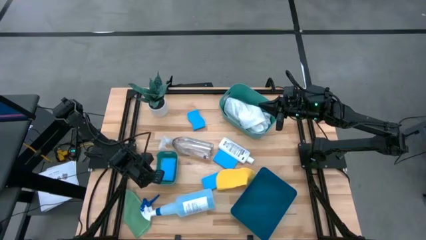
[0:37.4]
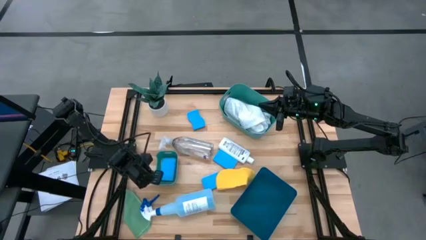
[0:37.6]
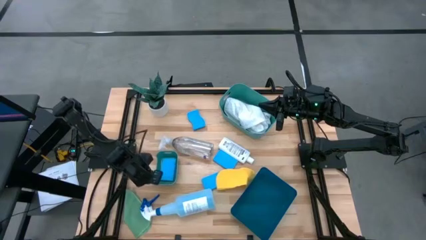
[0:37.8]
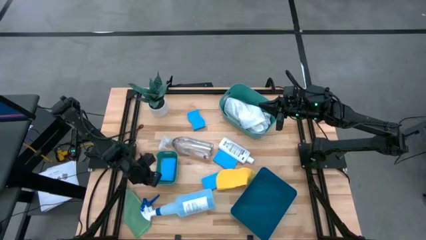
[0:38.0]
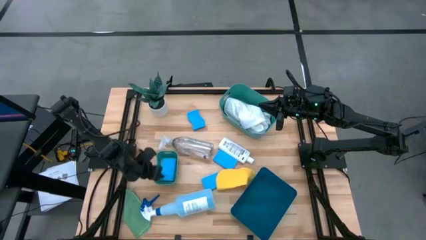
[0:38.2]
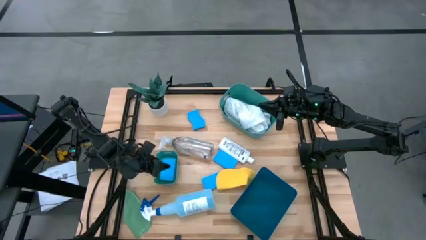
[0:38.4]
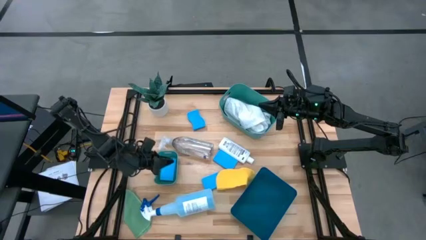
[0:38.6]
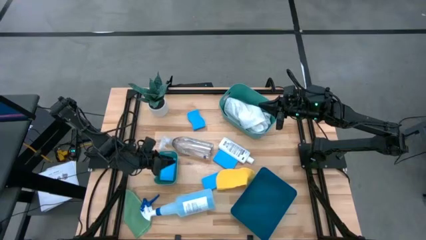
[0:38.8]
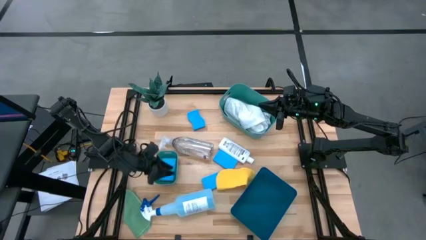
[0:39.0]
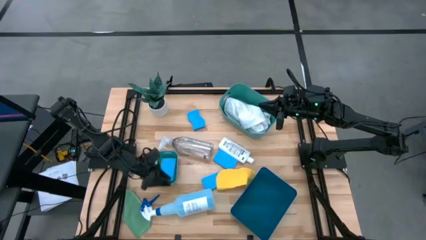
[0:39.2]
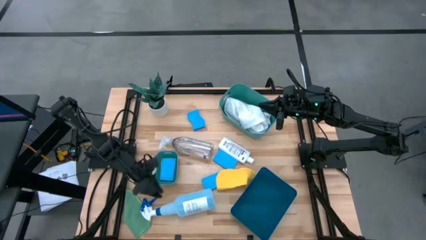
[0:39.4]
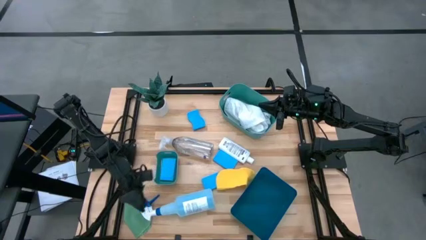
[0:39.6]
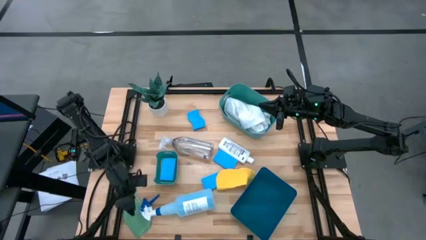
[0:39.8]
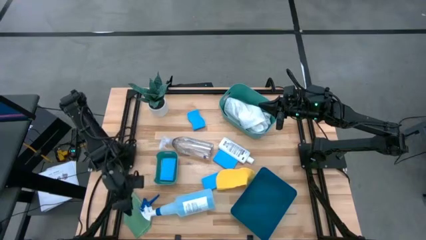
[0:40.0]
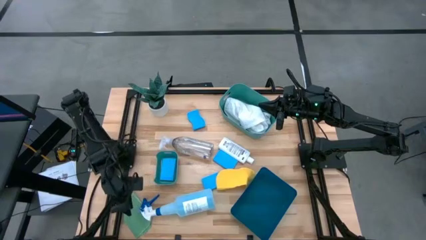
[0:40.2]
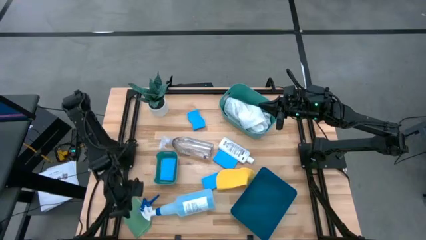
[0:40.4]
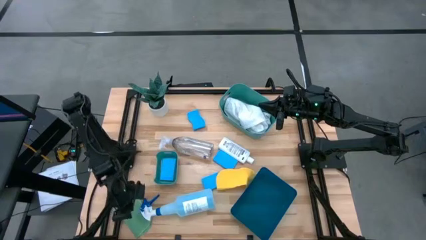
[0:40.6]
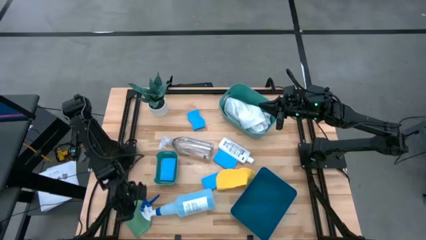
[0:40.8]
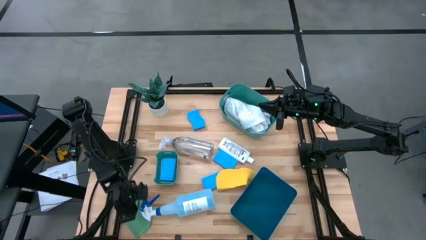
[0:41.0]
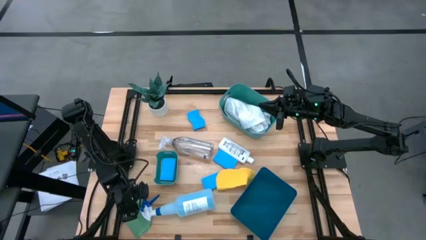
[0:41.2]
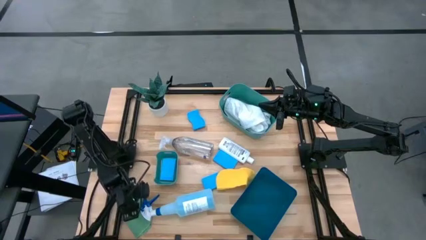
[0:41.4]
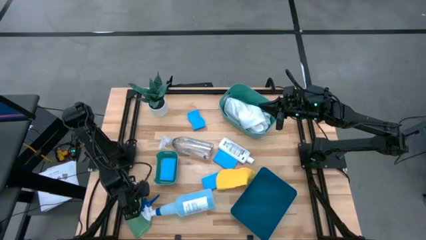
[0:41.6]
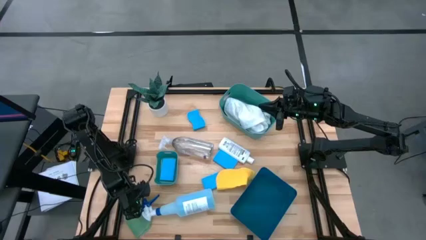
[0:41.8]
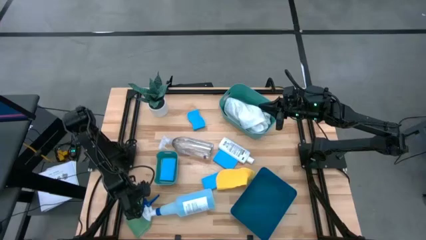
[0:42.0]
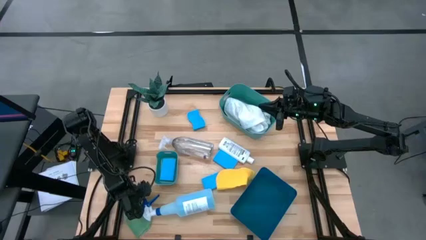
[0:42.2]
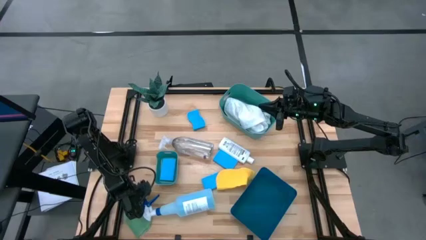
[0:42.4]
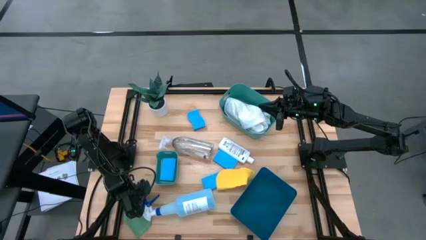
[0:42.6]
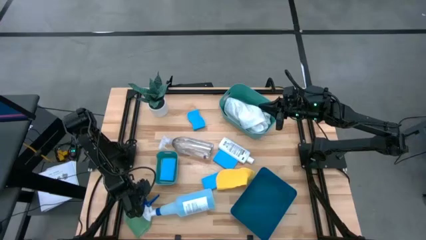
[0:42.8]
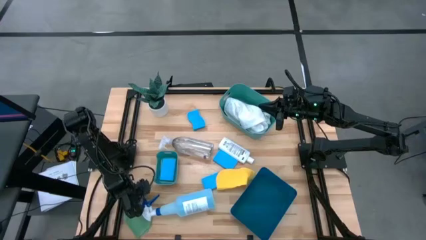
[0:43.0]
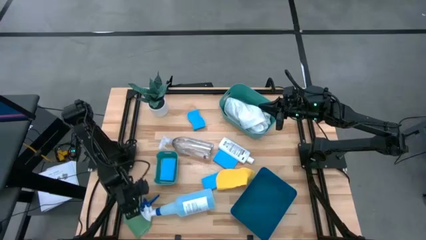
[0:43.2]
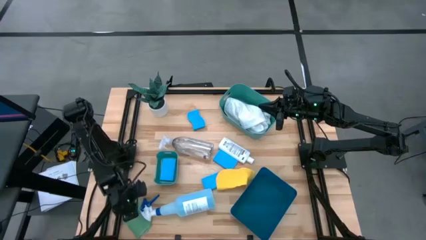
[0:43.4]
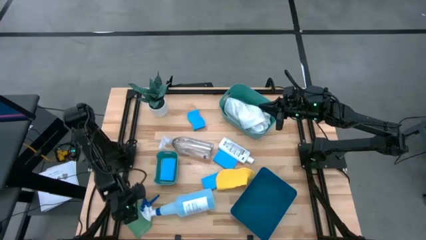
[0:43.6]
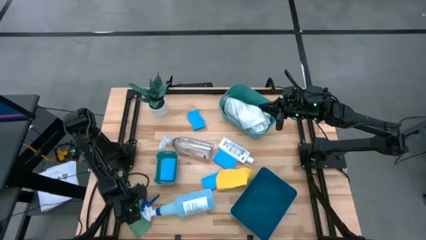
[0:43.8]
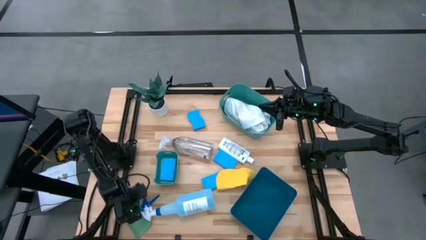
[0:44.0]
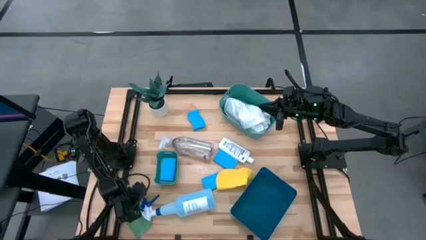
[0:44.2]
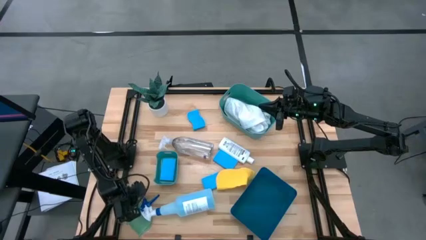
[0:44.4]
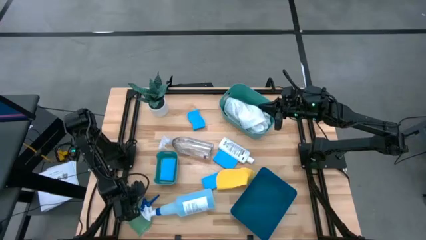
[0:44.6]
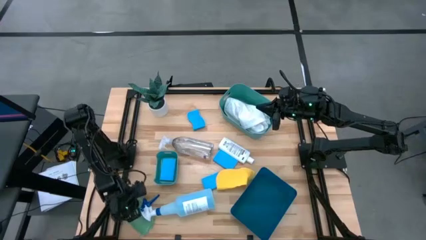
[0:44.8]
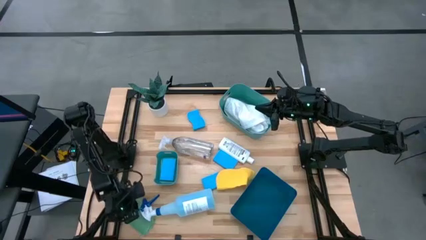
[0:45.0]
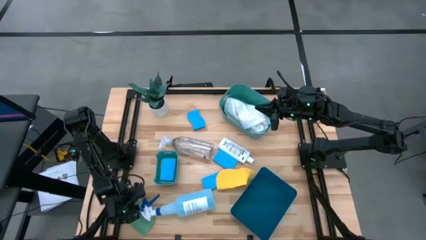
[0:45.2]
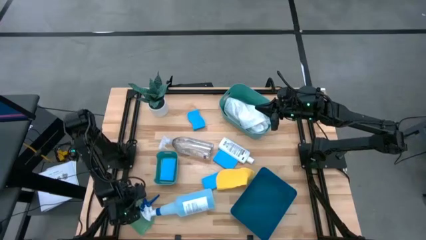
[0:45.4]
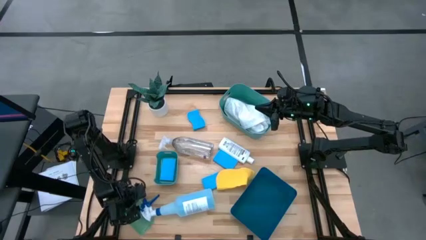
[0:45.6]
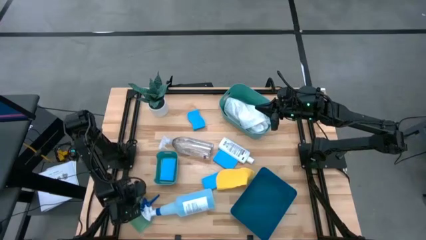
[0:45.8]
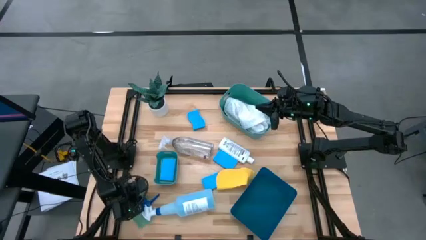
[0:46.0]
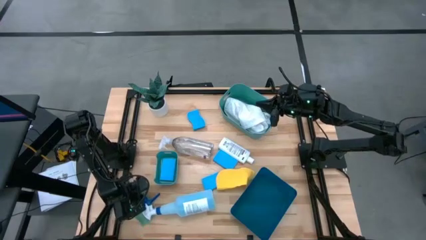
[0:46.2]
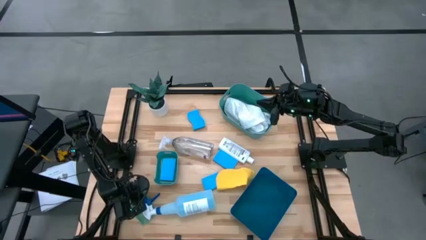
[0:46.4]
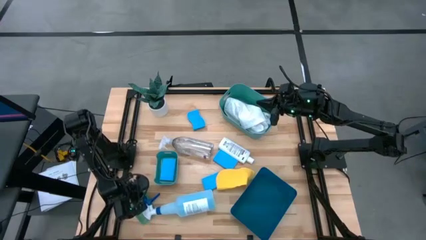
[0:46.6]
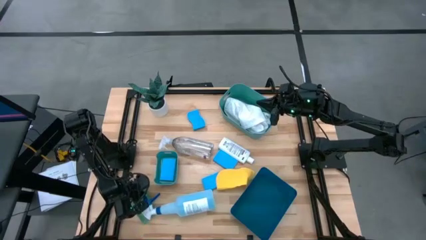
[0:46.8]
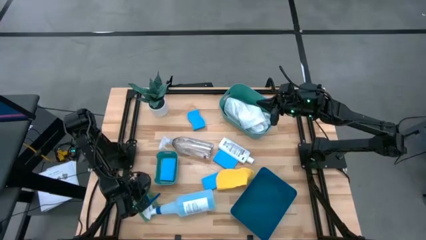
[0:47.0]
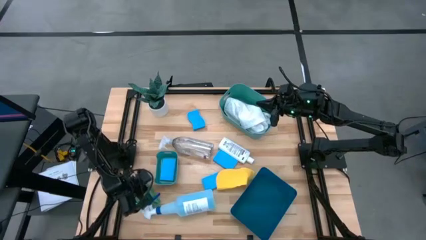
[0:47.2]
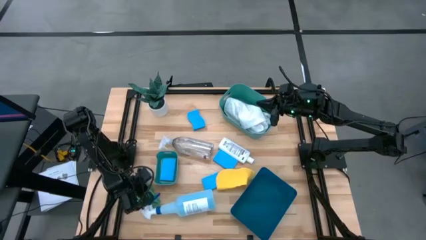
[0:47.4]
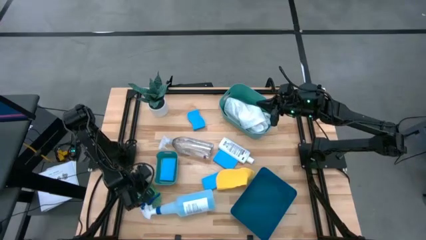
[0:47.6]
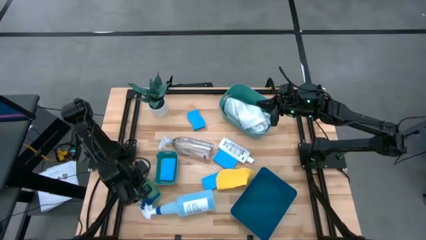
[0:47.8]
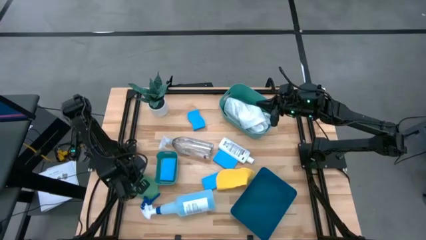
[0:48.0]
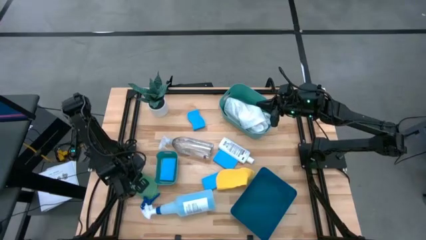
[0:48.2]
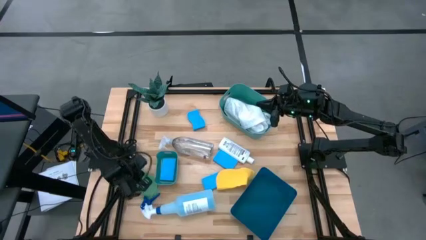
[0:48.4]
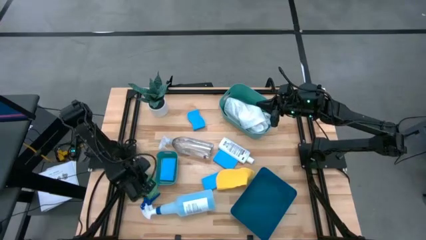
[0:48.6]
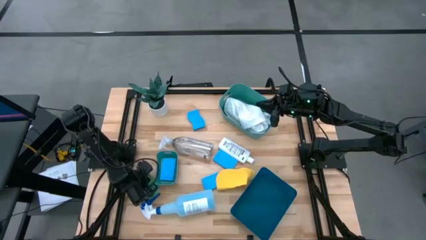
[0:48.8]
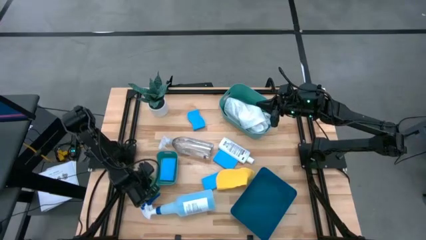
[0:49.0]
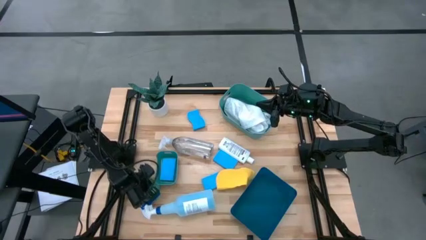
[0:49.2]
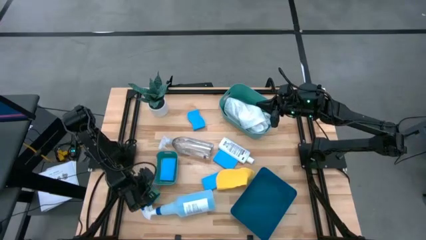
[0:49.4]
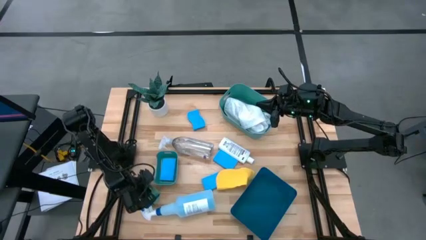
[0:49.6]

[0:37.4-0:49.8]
Task: Pick & Place Kitchen Items
Put the green towel into the big green bin
